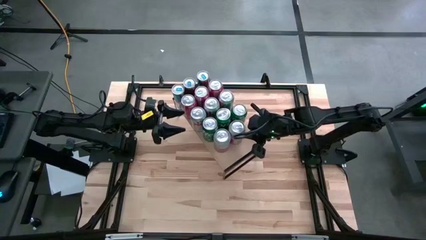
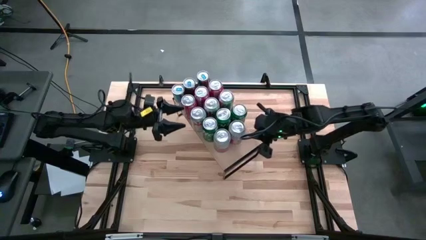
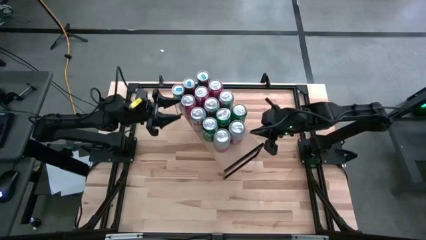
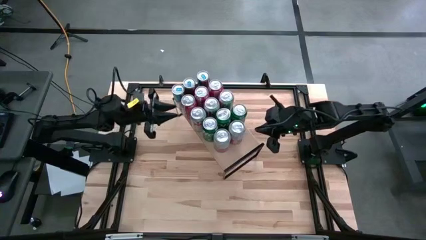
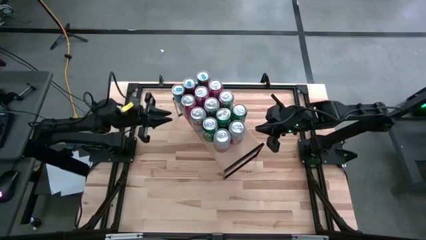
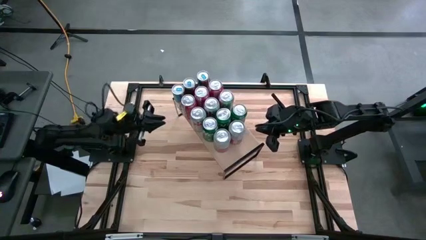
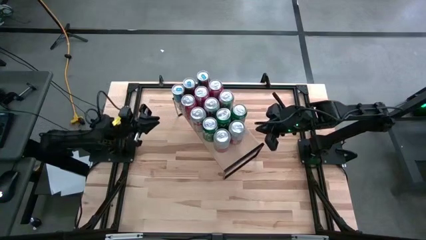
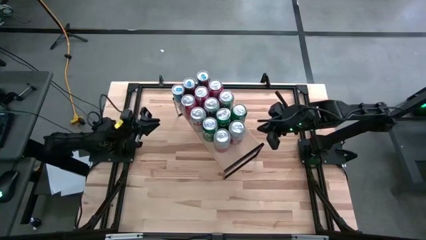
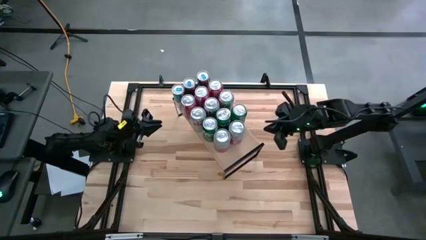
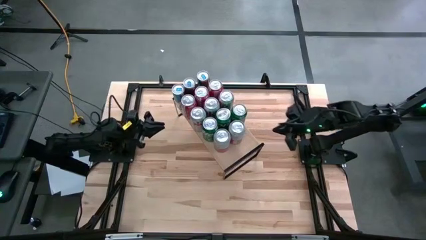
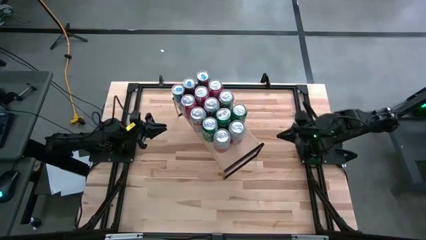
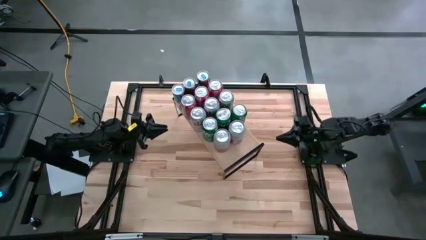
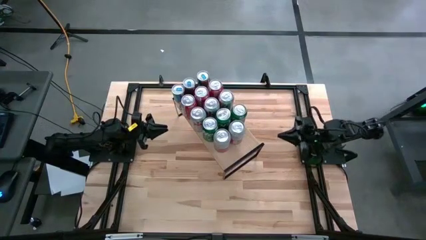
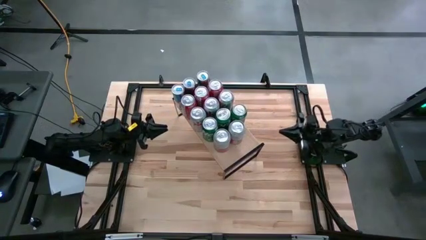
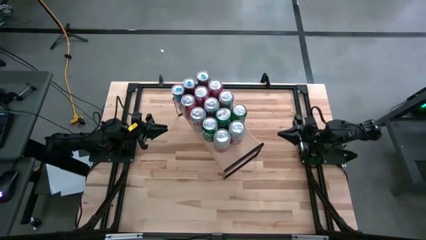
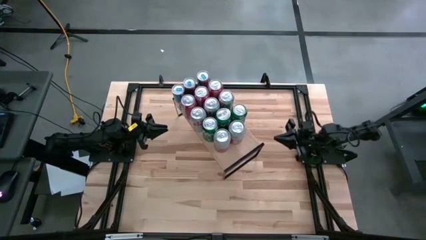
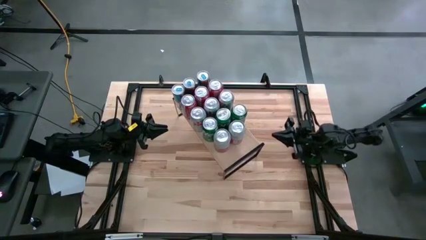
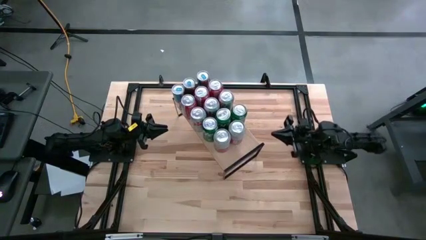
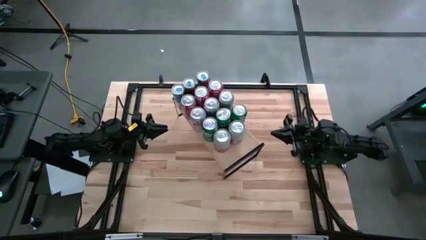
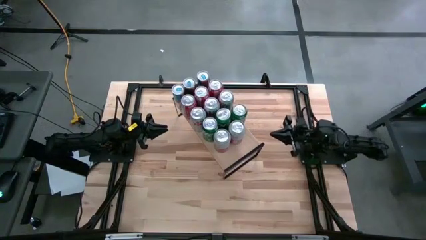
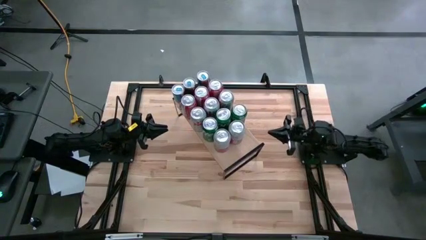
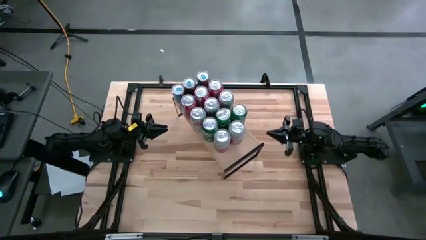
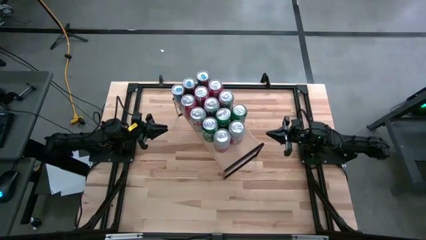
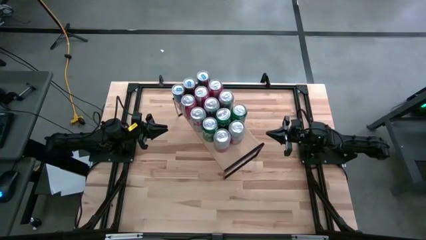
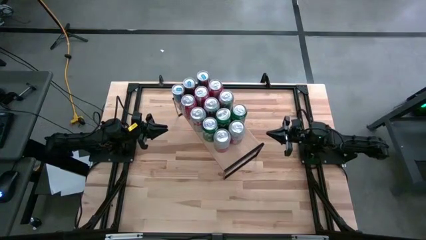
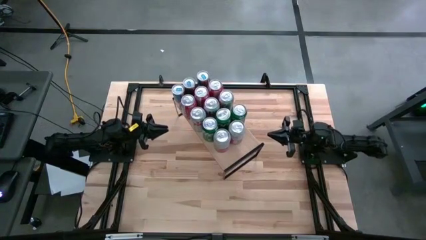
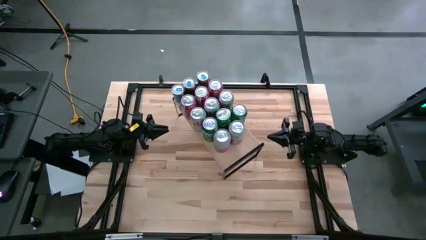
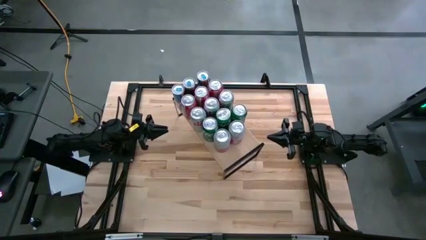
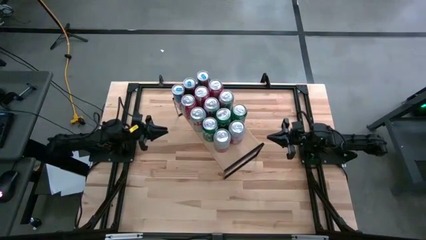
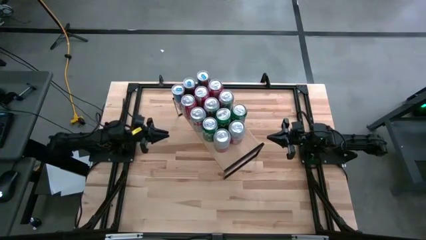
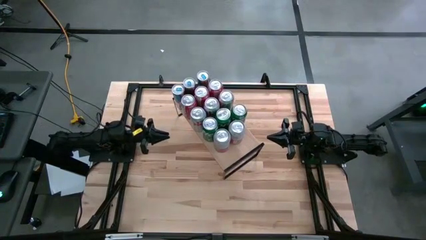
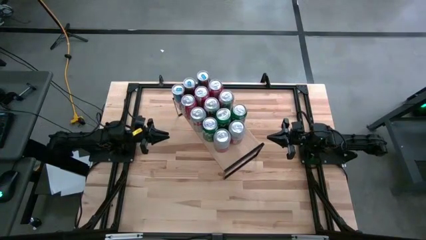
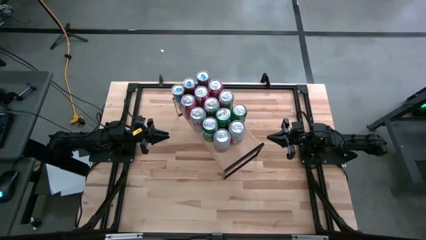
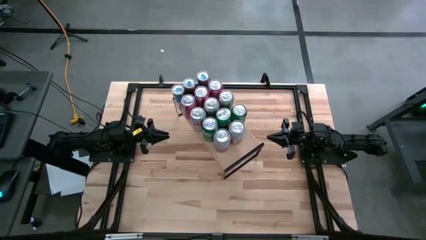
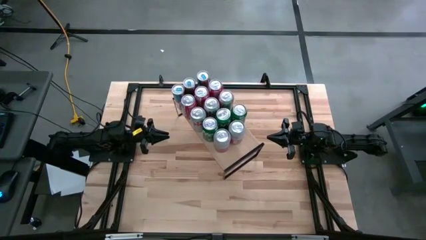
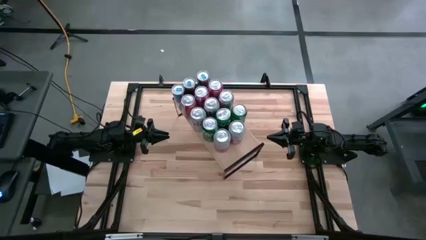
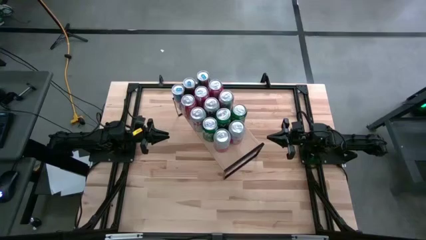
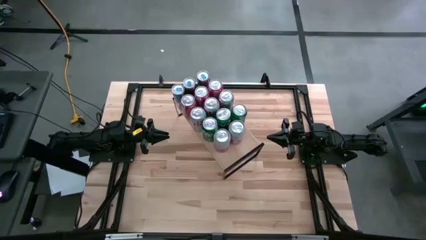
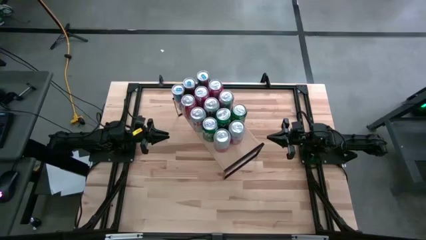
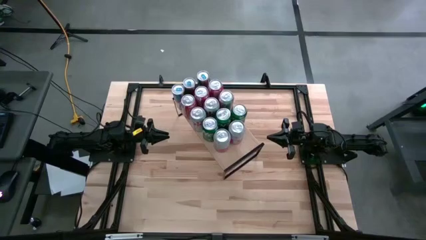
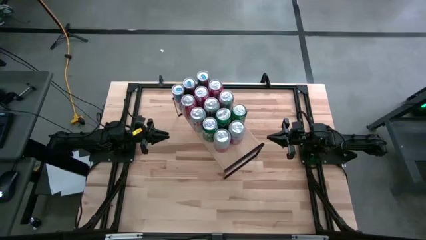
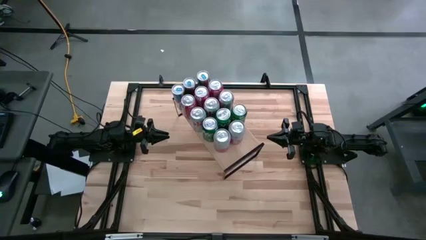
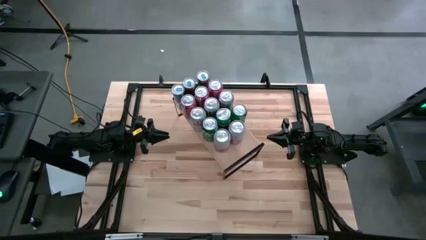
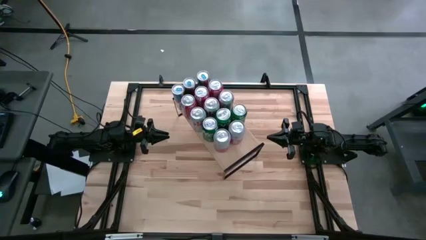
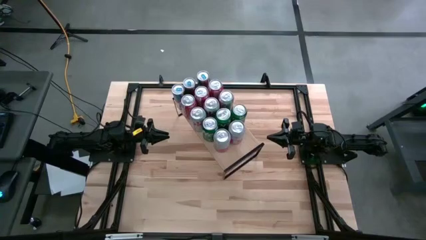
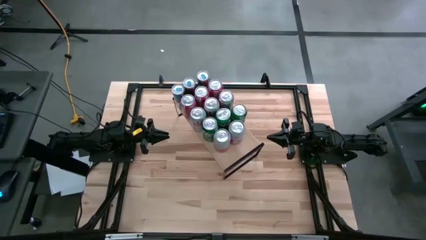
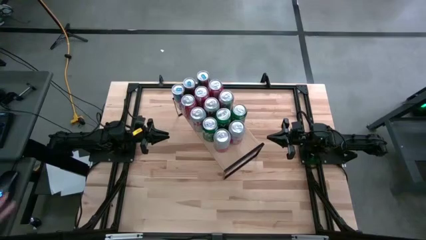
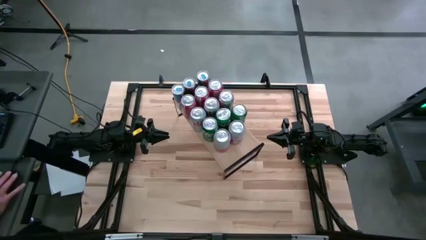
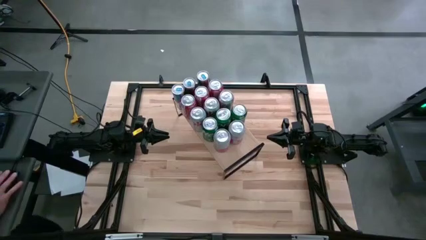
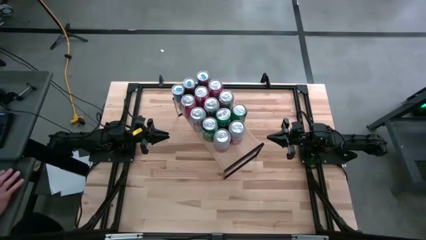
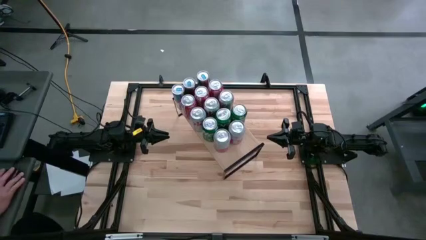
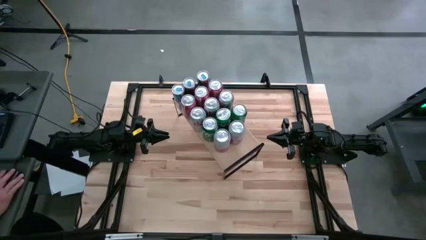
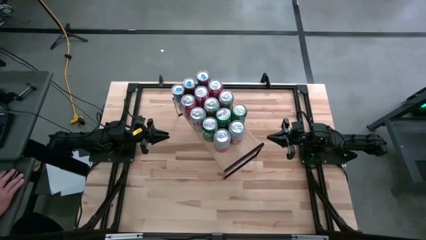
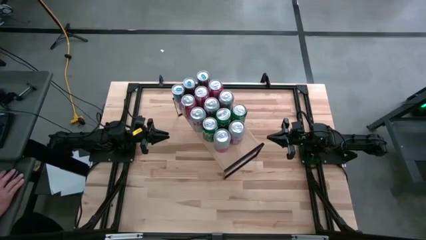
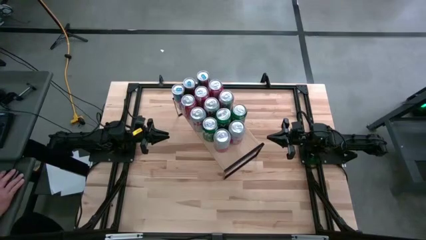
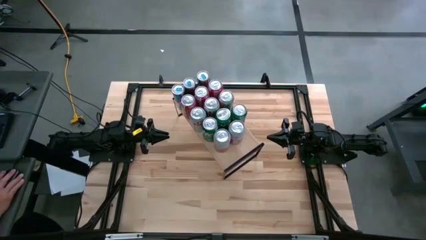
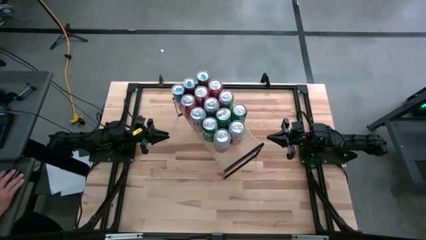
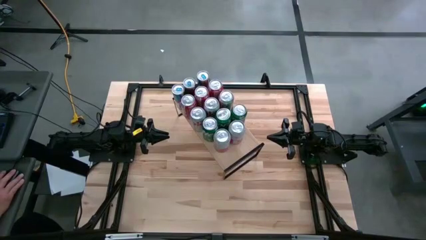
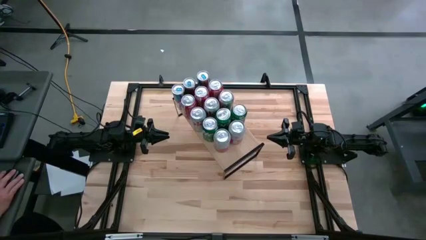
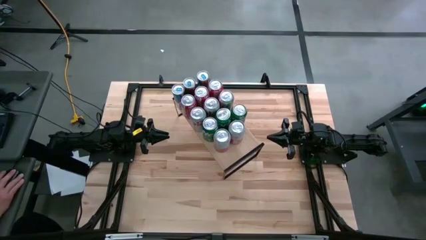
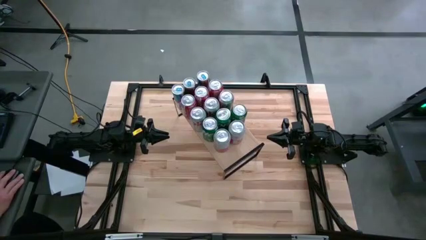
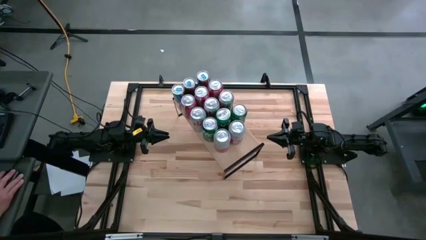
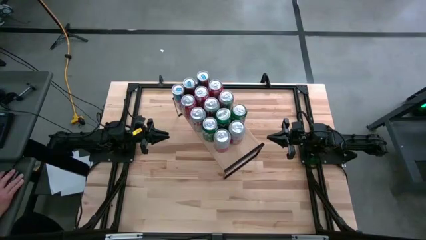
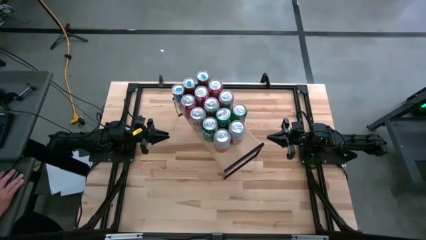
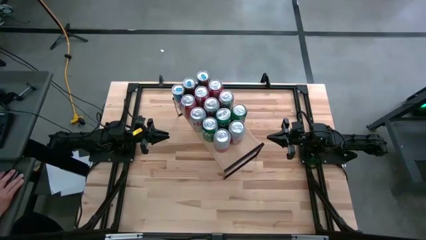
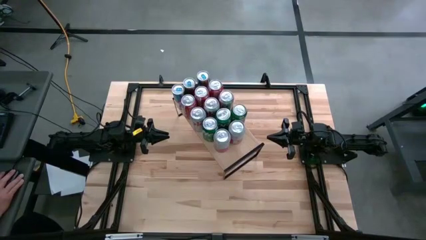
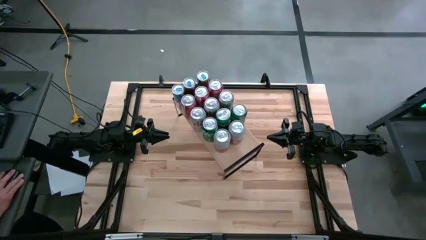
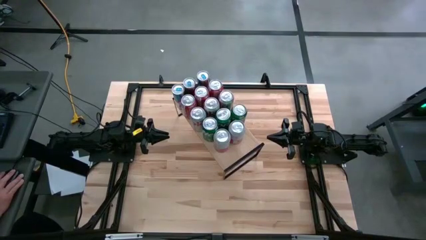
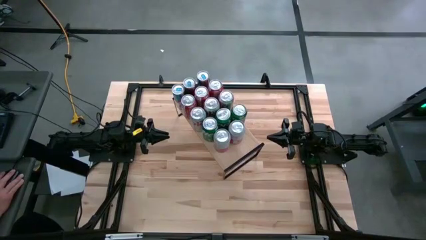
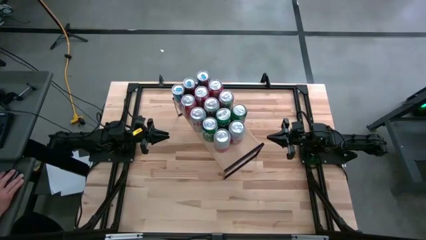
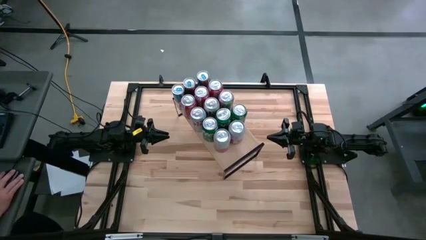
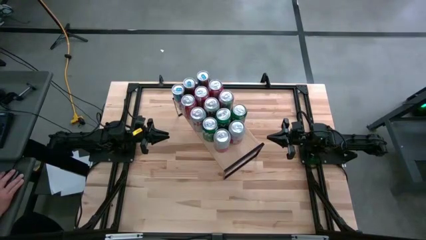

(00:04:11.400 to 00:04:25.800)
Task: Place canned beverage on shelf
Return to Home Position
